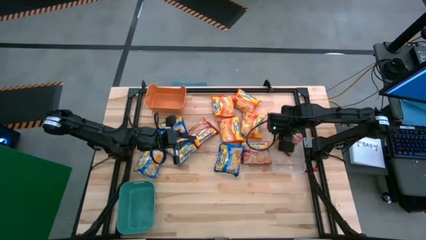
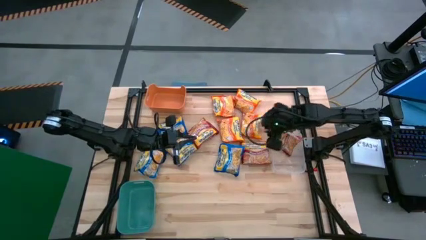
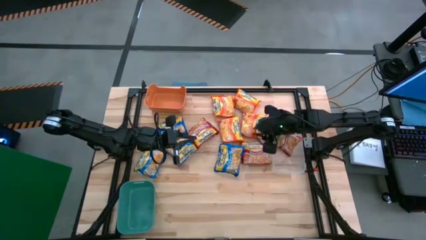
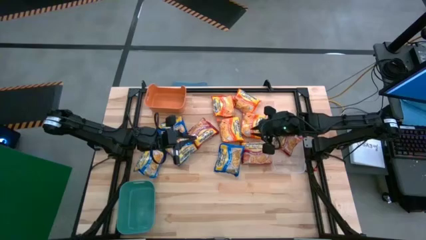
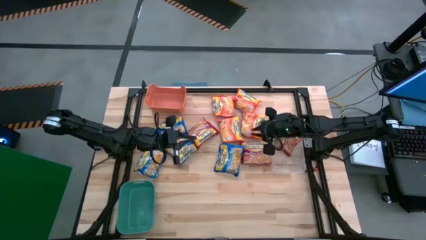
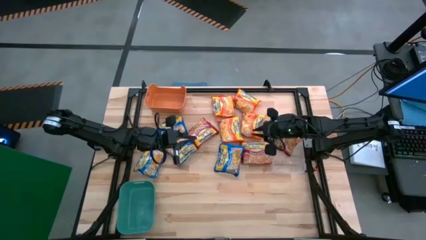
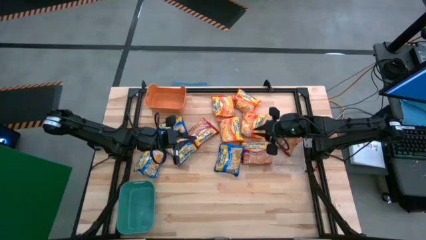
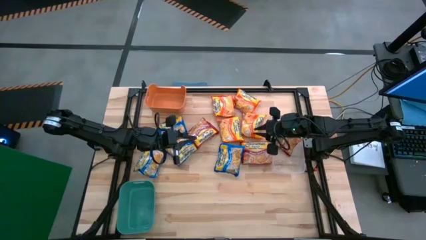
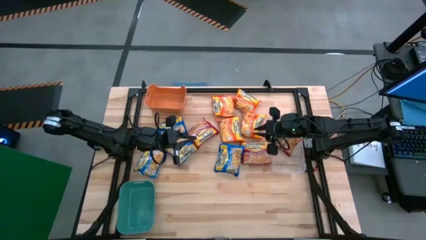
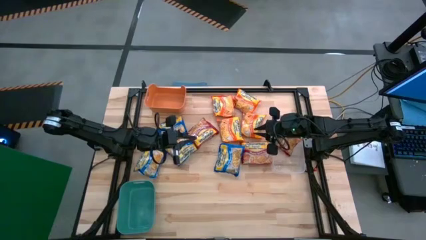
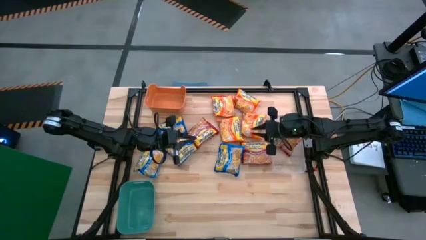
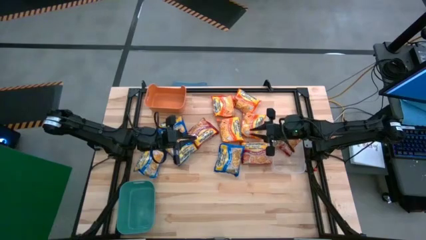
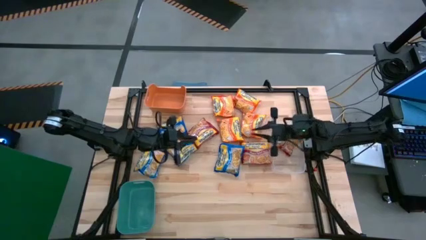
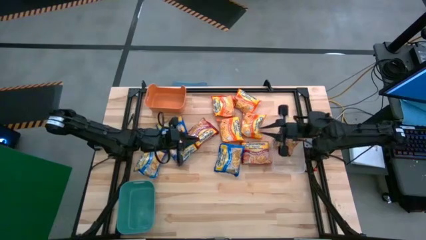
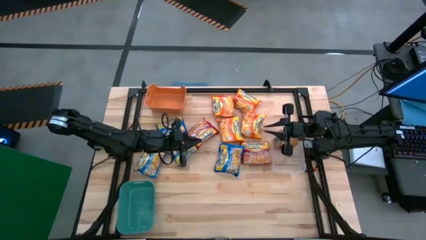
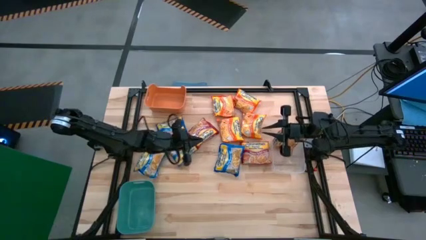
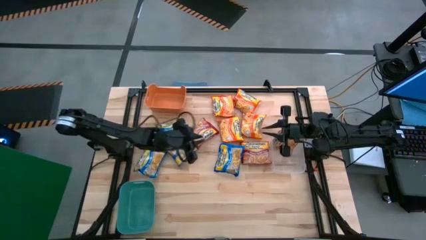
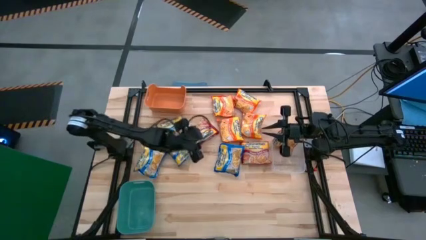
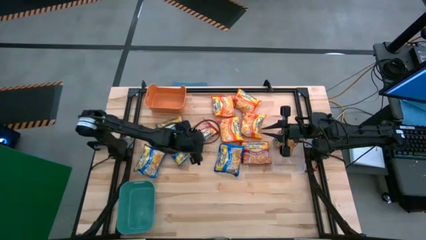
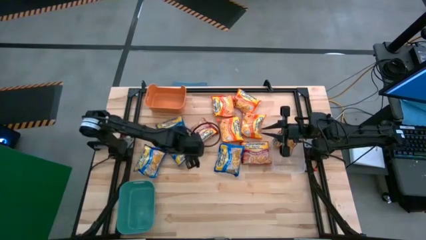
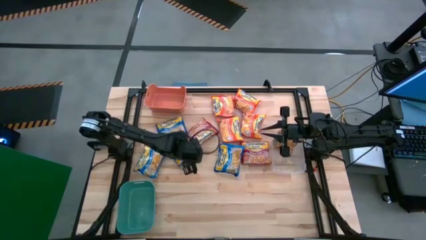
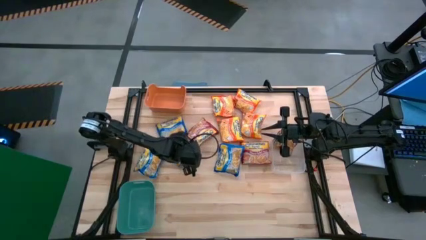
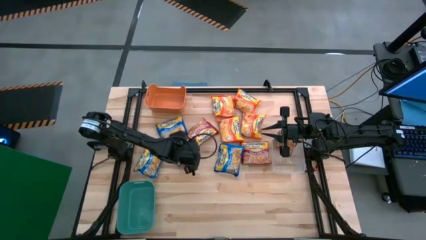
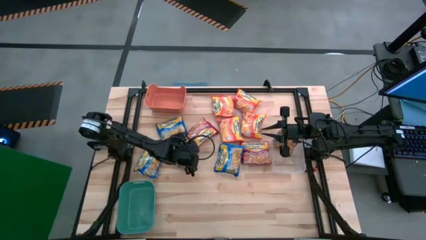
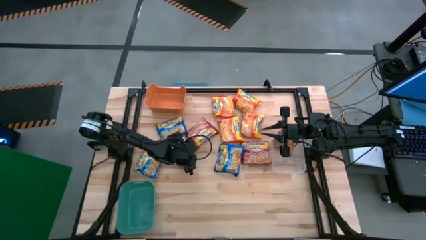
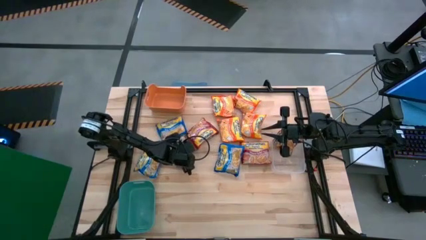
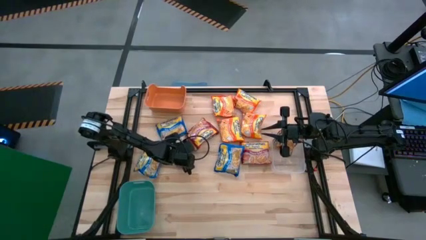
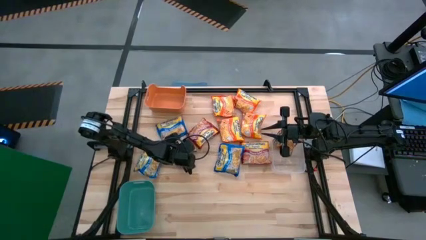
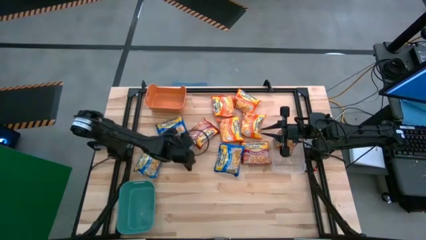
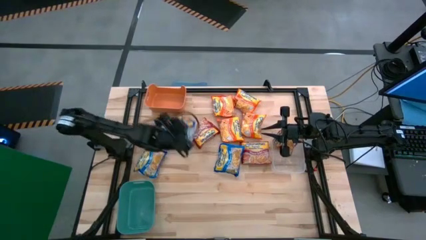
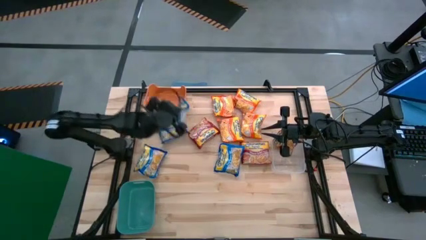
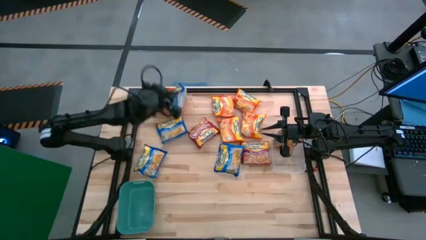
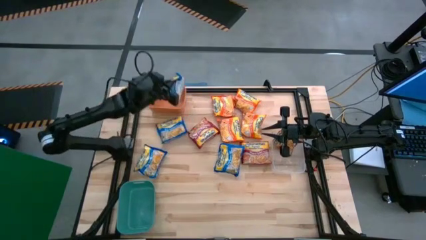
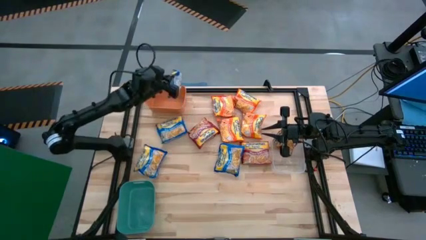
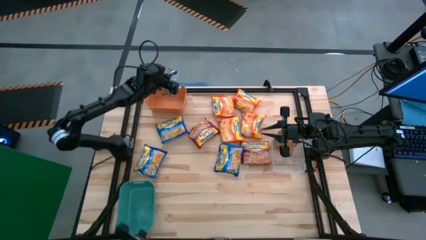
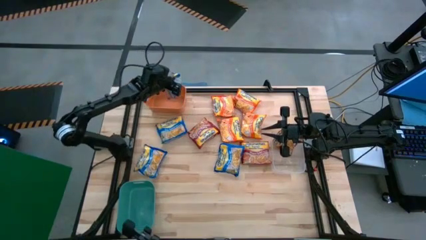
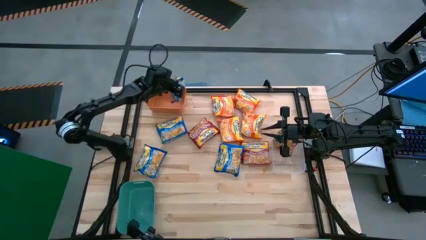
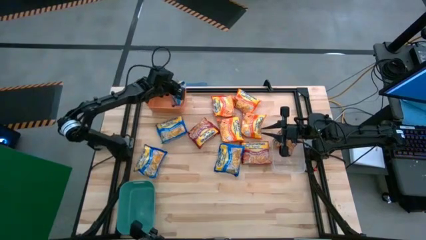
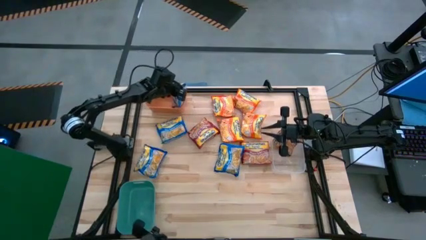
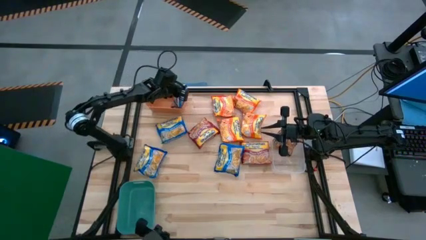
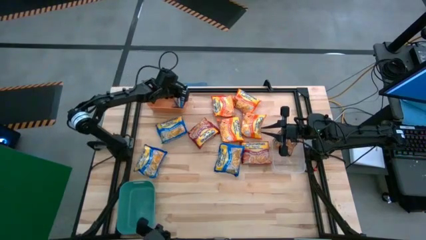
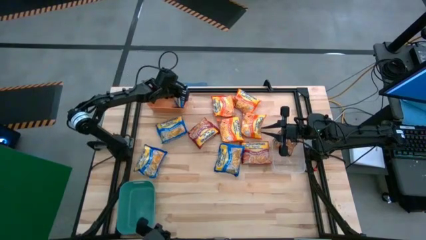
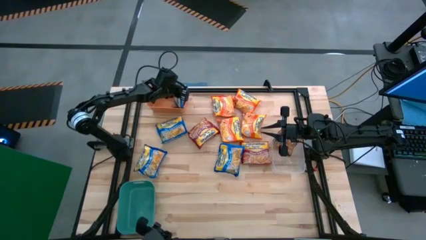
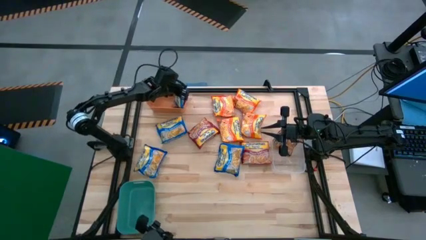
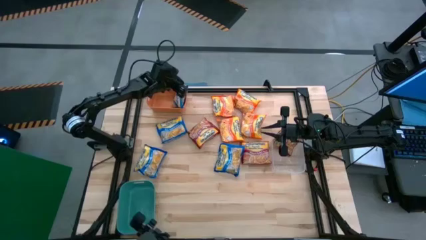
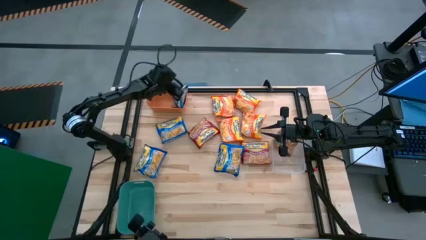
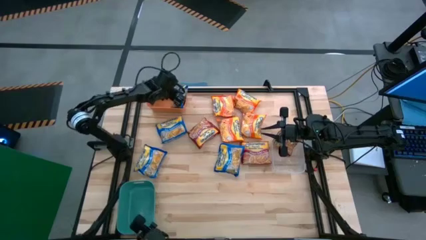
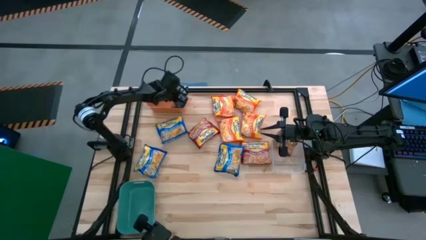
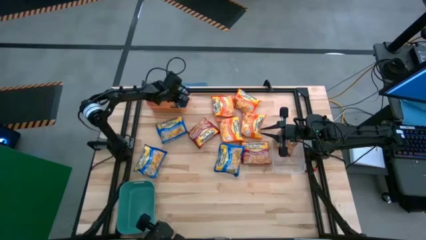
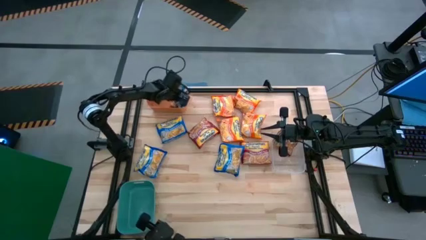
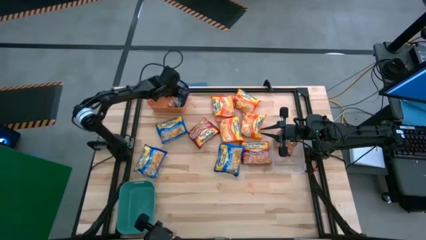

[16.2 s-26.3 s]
Task: Sort Maruchan noodles
Put the blue noodle pack into the orange bin

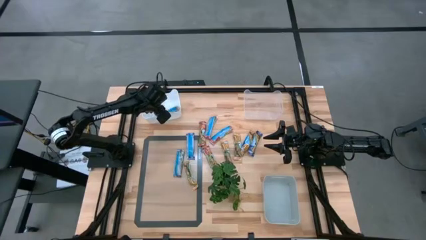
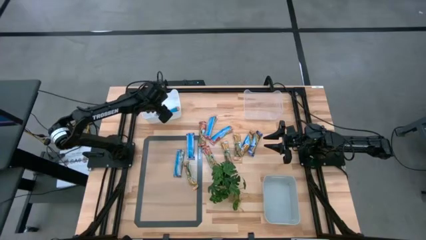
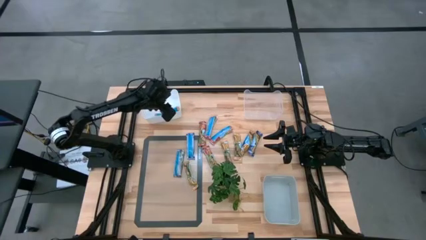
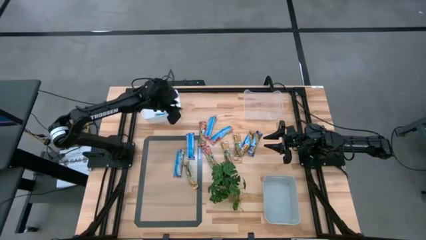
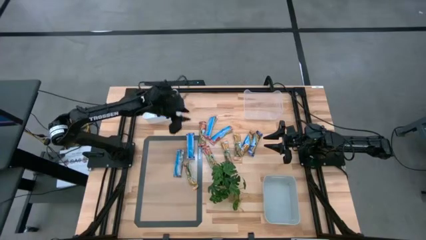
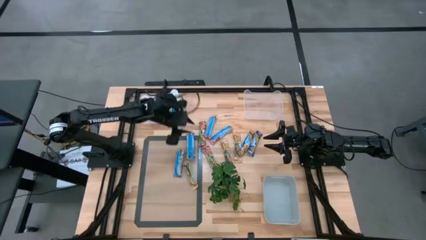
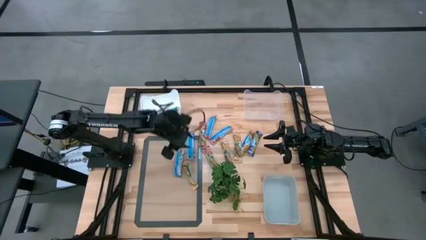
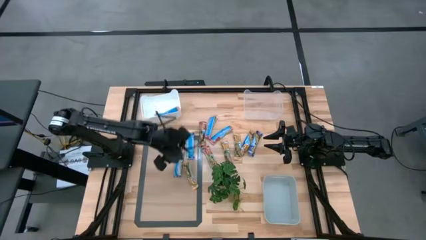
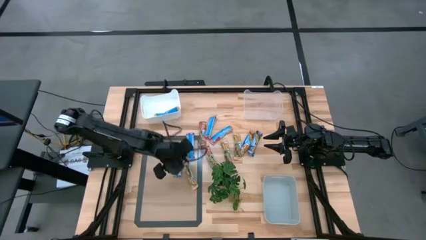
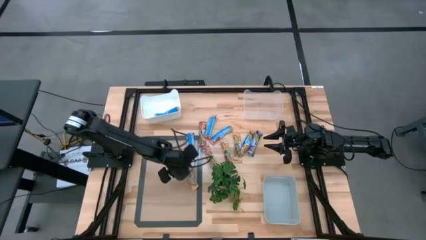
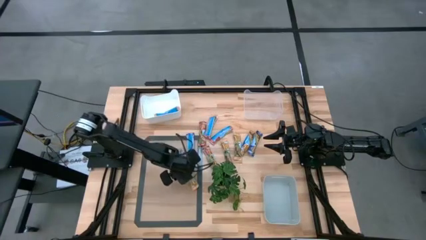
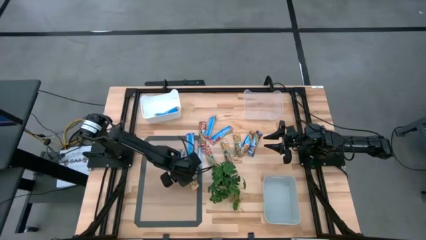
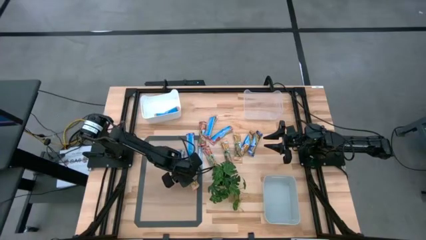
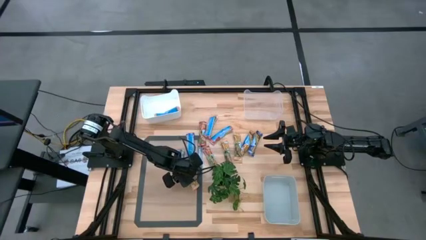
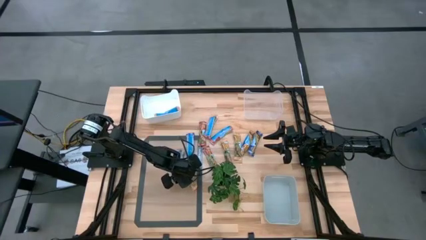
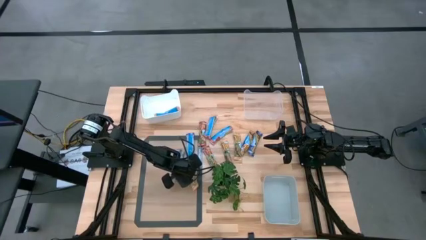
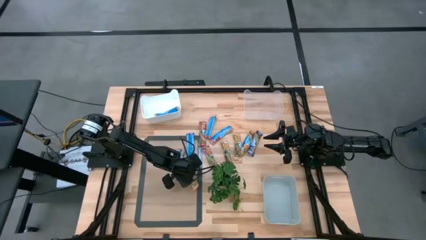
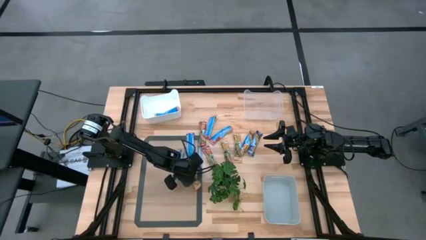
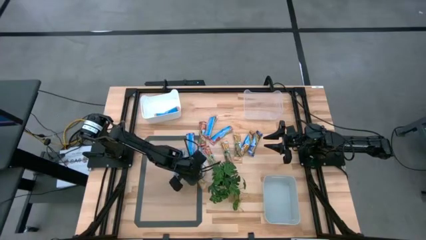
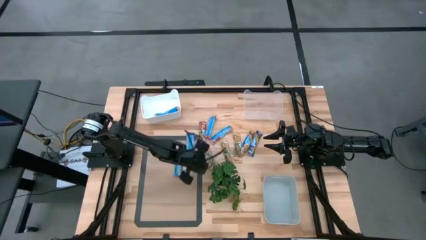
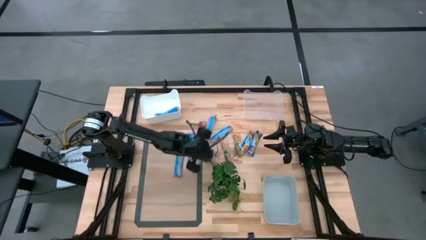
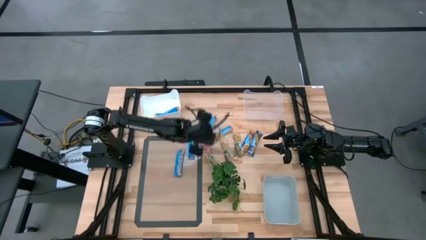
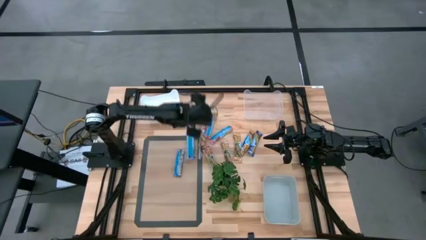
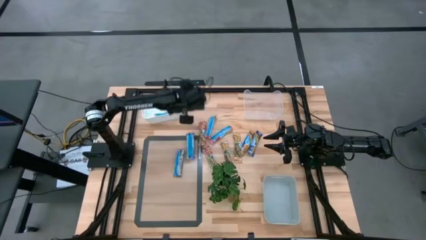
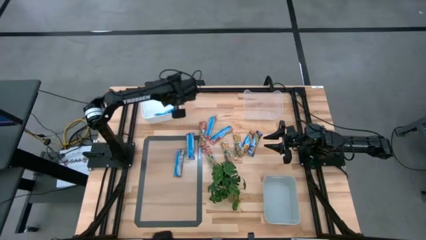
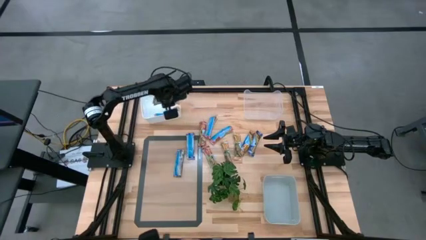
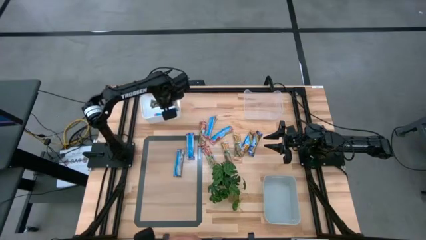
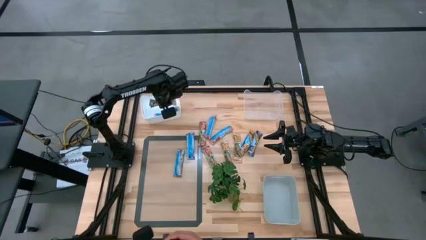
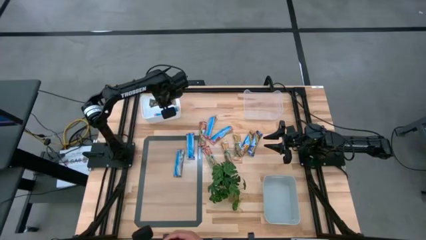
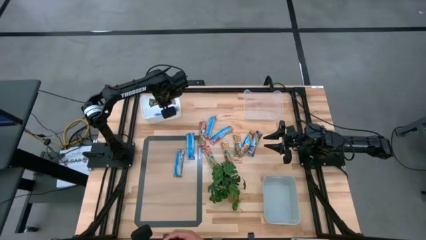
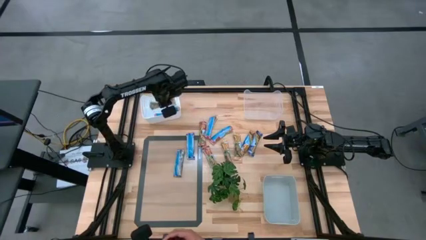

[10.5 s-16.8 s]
Task: Pick and place Granola Bars by type
Put the yellow granola bar into the white bin
